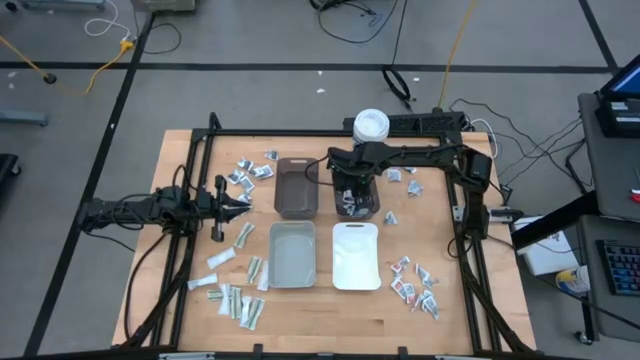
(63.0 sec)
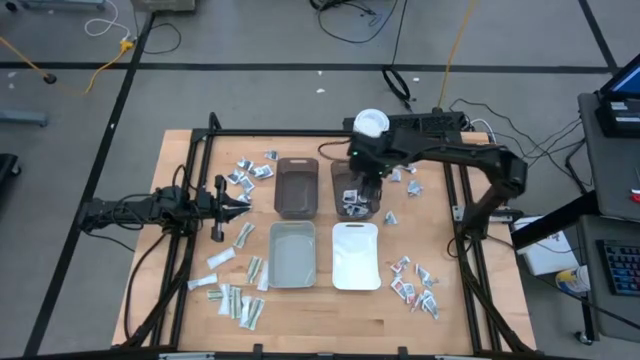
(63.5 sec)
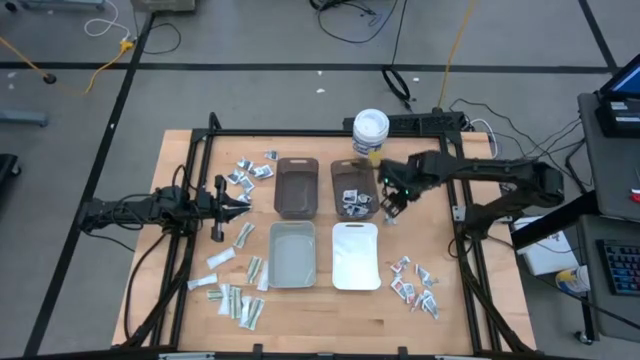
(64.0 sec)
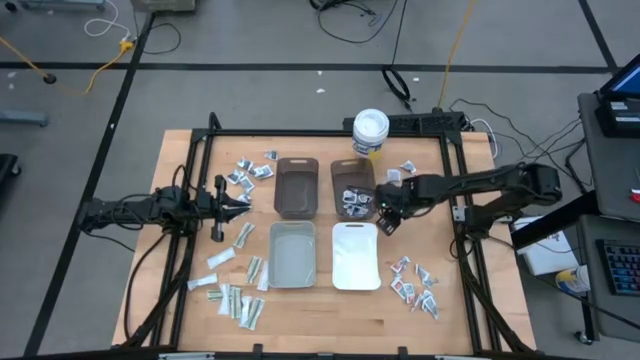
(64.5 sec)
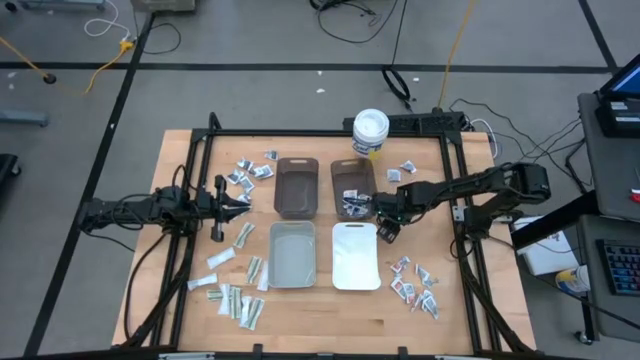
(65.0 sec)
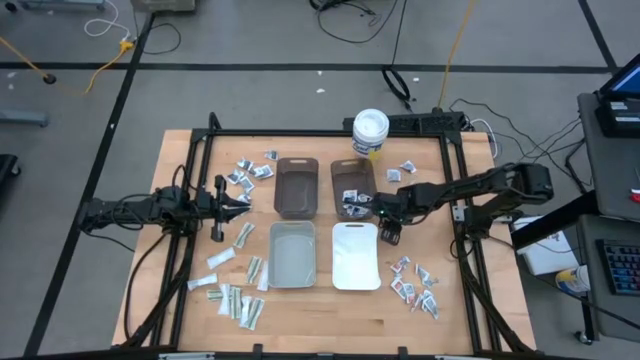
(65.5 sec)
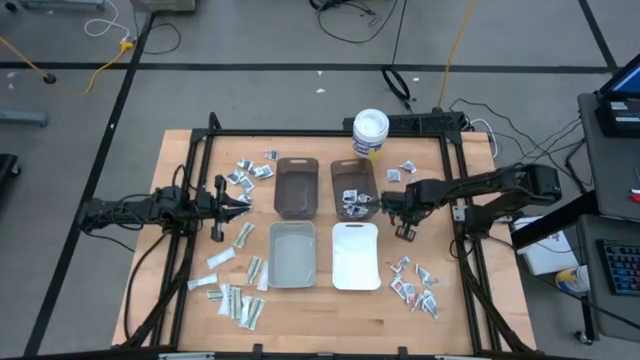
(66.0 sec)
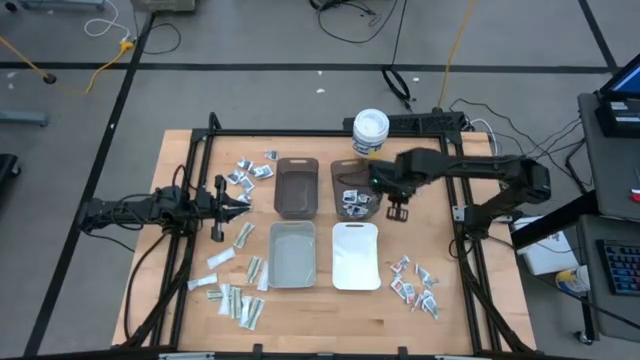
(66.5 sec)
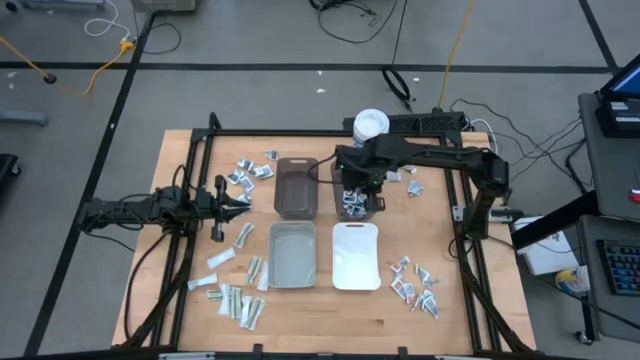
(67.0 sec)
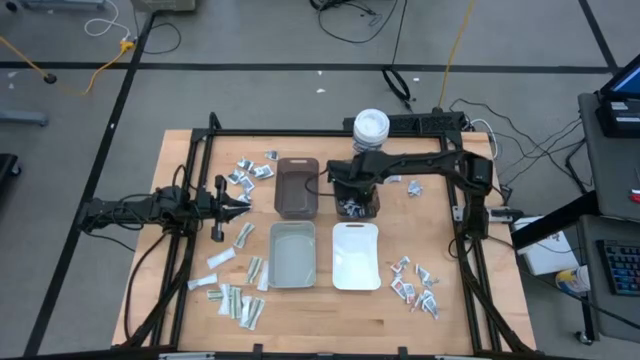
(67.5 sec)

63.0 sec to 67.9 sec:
Task: Pick & Place First Aid Supplies
Put the blue pad into the right black bin

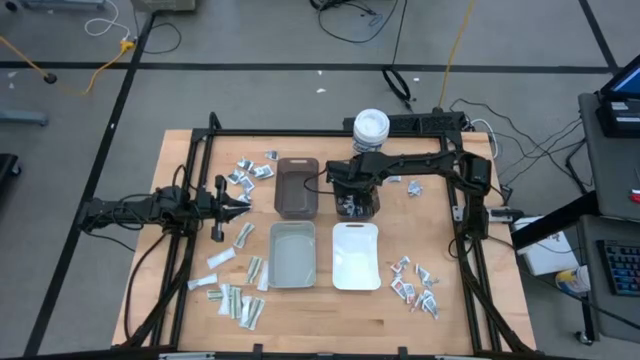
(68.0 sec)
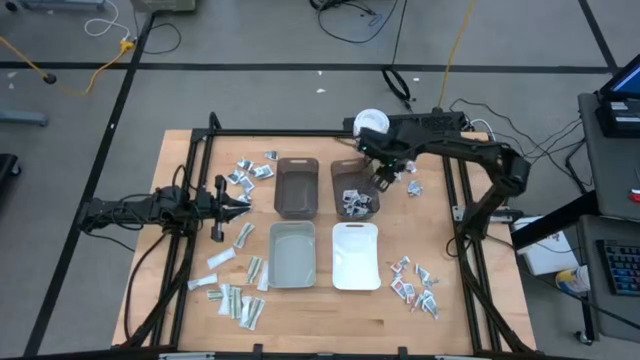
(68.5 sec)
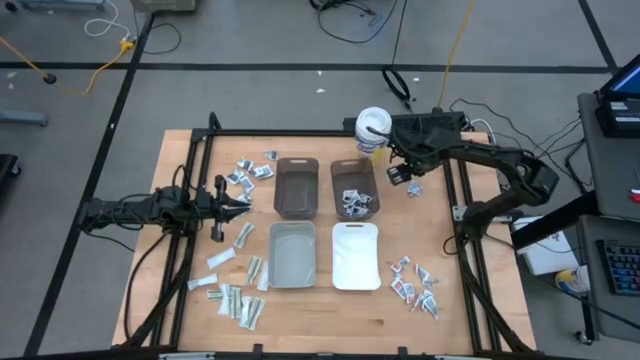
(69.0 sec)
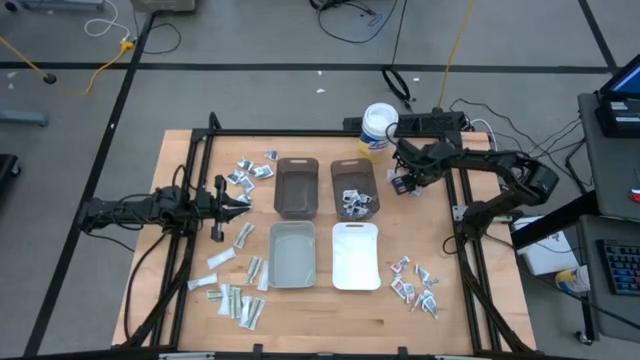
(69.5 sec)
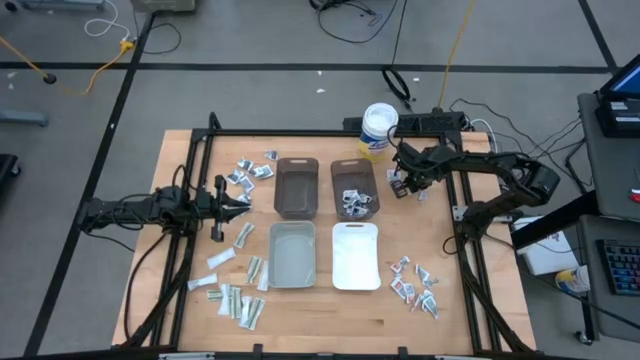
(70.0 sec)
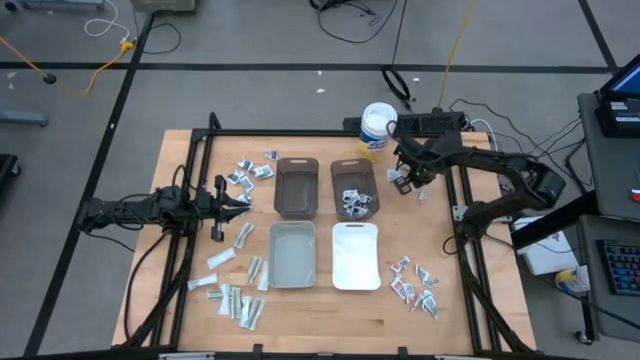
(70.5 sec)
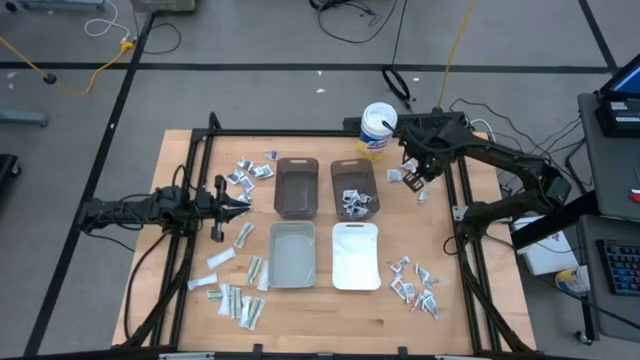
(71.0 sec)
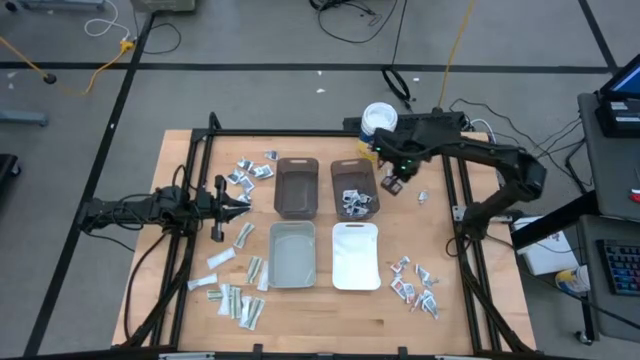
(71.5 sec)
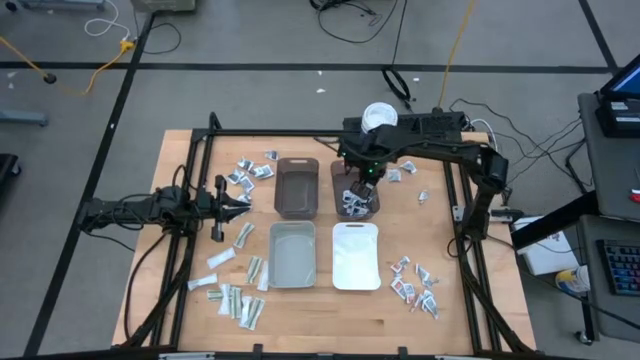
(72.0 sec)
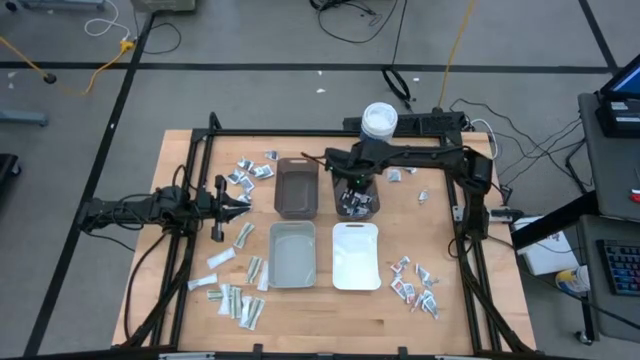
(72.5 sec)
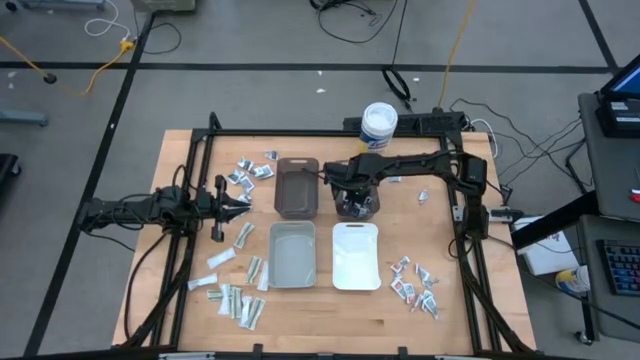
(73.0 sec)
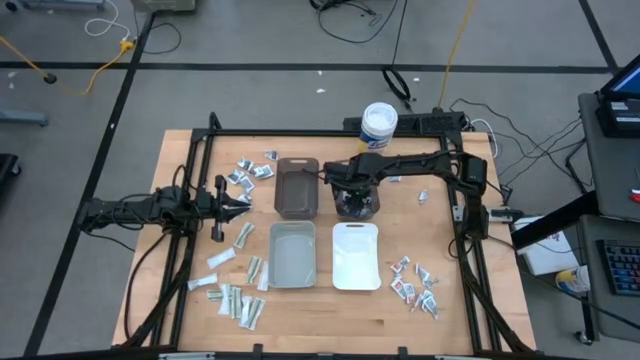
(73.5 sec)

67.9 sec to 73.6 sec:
Put the blue pad into the right black bin

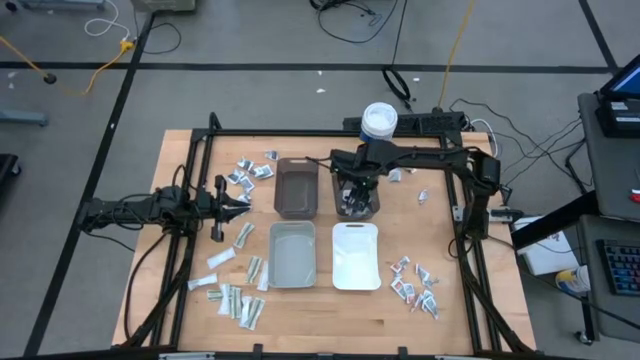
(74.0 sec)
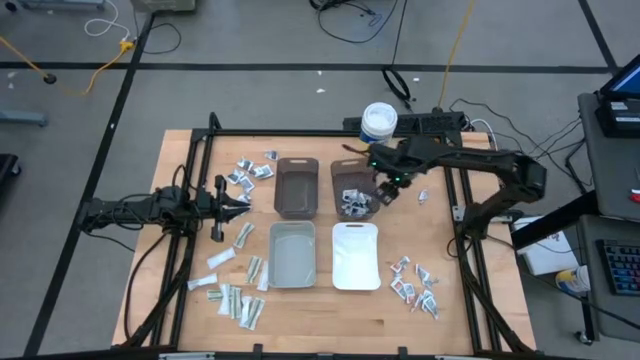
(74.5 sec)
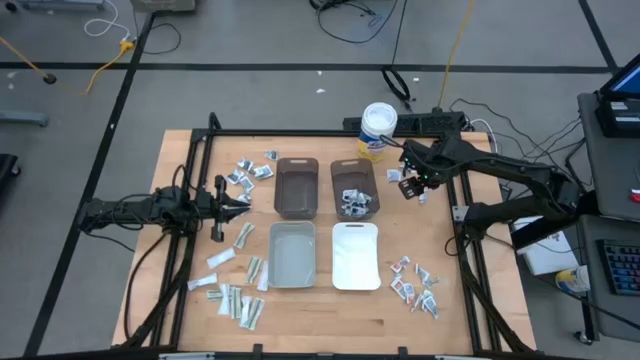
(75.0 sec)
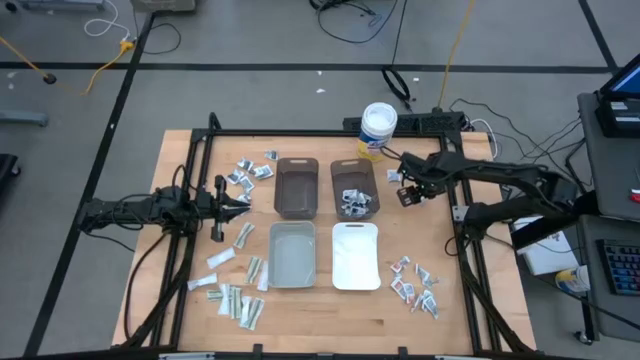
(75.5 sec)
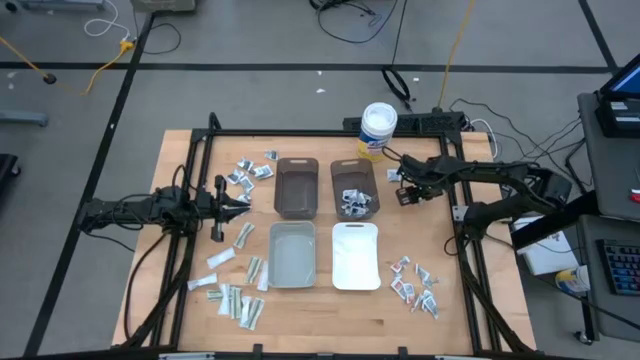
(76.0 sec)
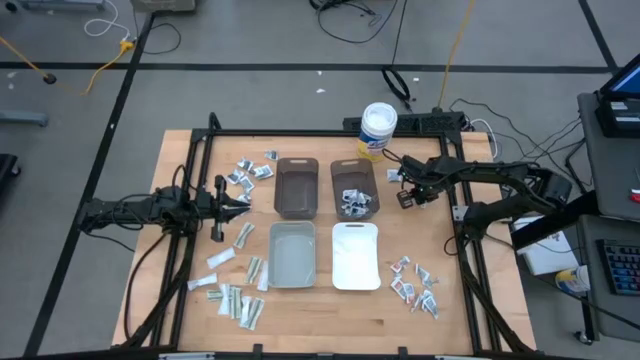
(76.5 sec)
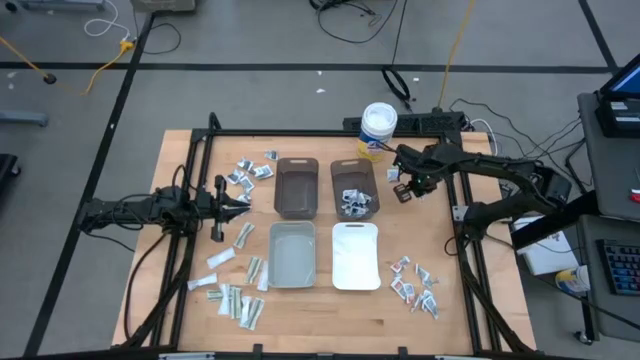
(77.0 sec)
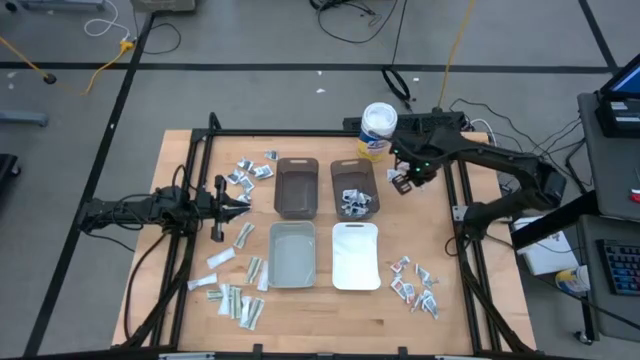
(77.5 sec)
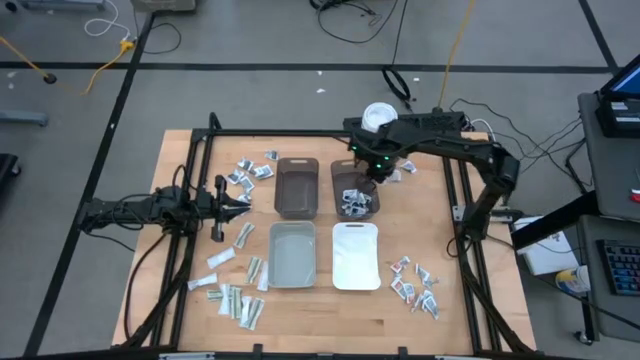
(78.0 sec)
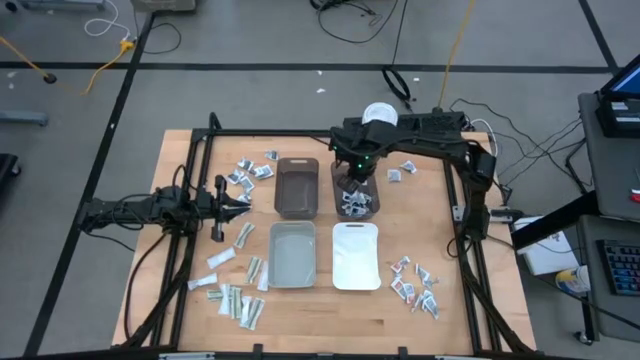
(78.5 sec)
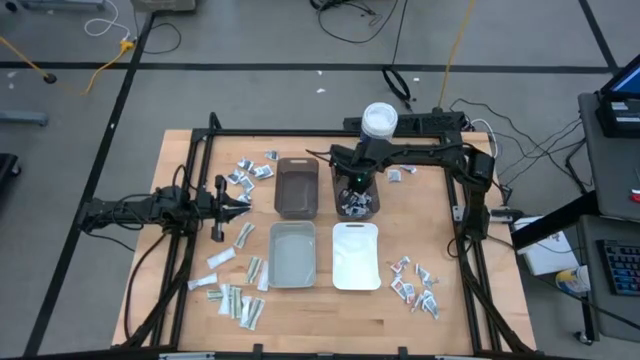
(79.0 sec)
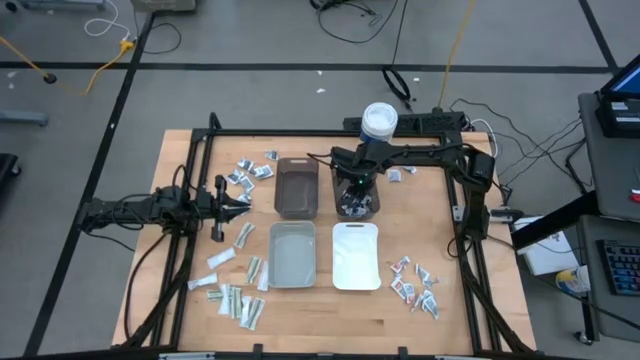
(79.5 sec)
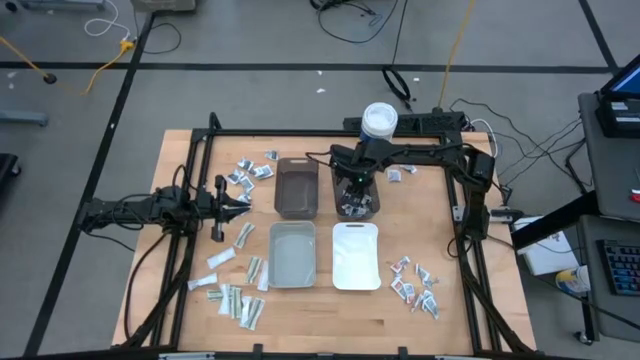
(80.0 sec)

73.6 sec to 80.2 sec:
Put the blue pad into the right black bin

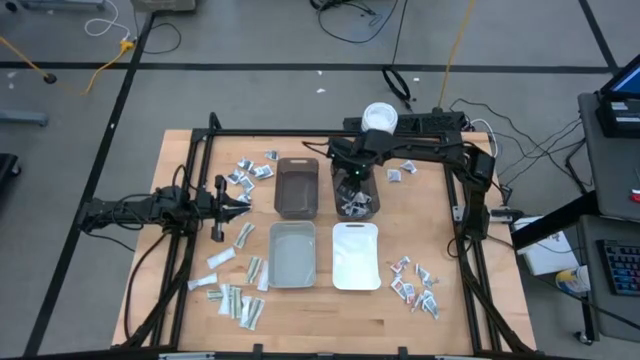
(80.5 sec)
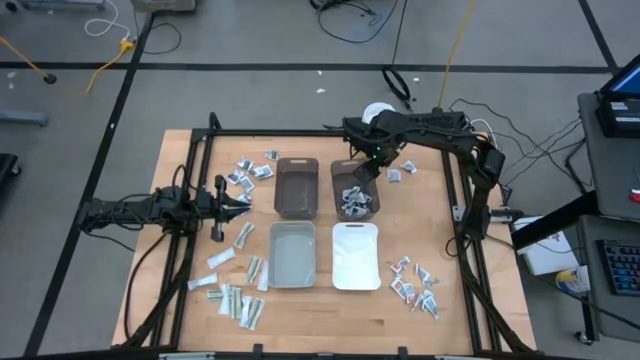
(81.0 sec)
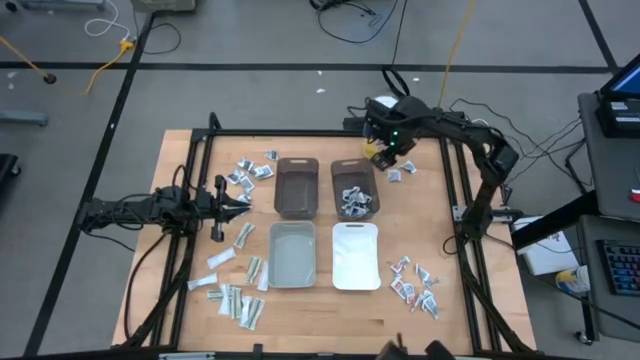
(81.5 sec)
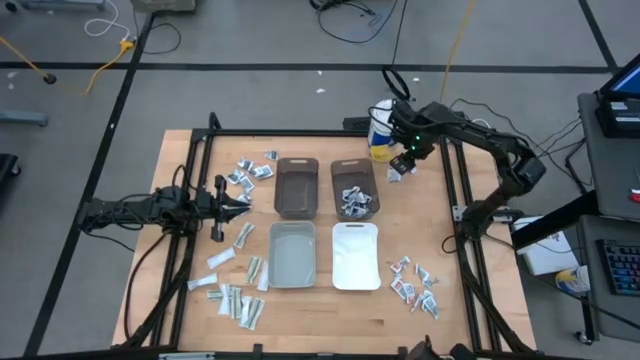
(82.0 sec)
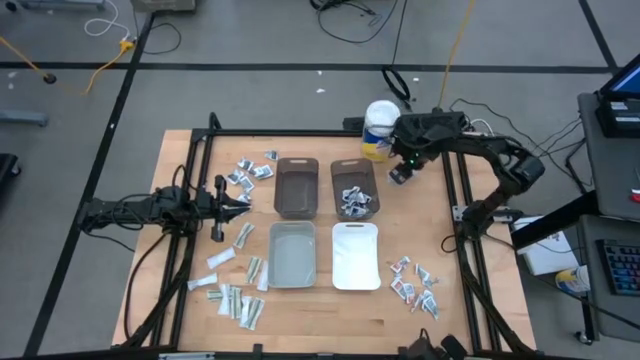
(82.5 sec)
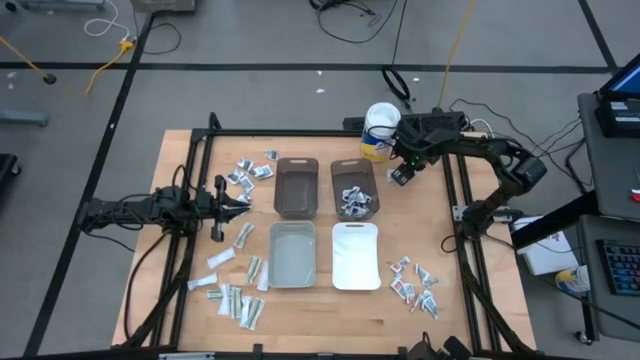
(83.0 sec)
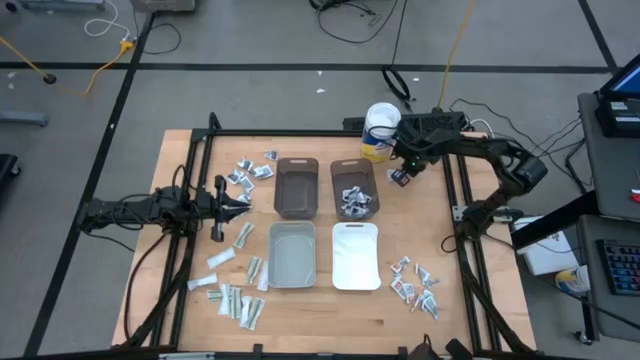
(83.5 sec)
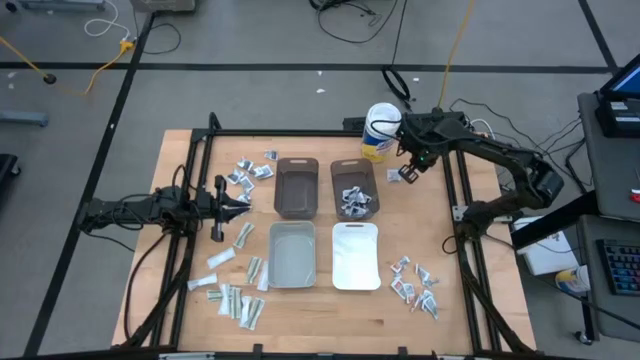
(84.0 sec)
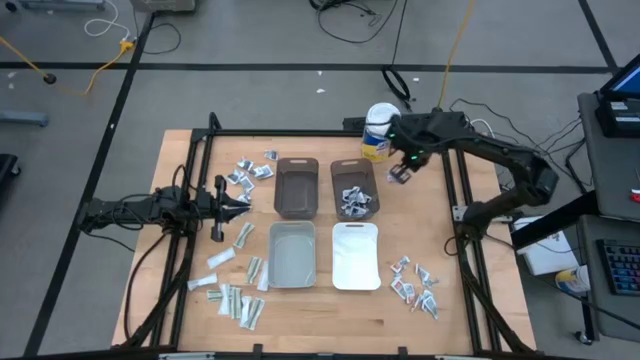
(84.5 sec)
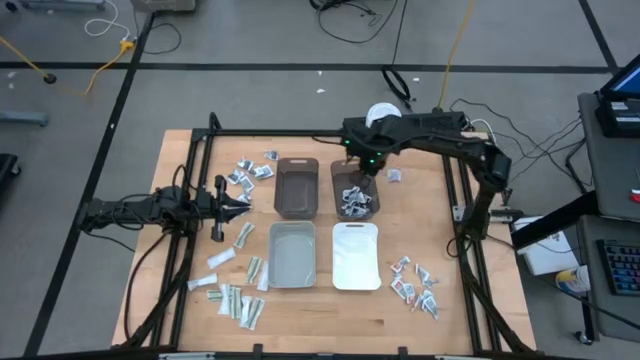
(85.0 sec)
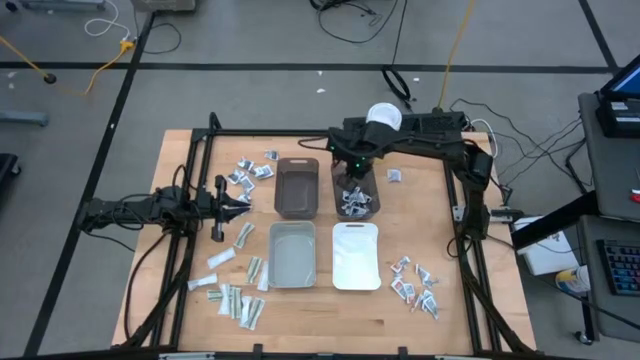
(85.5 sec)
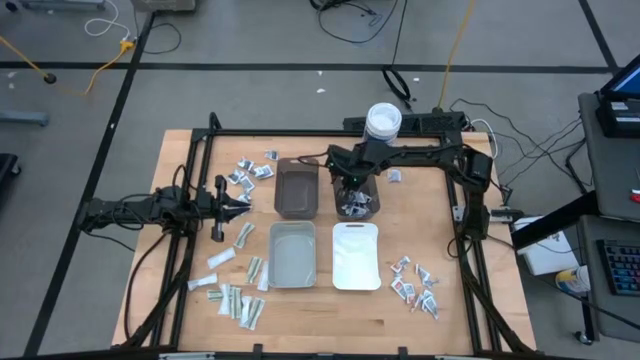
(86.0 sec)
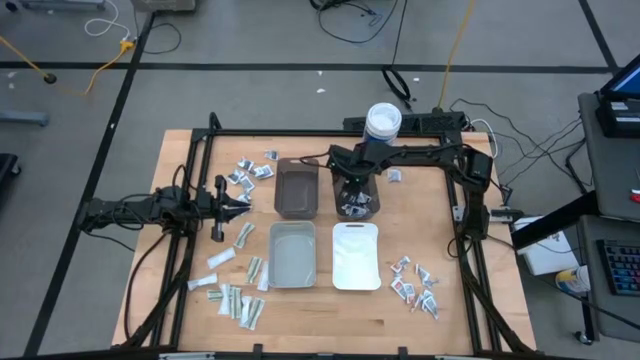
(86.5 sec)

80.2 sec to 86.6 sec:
Put the blue pad into the right black bin
